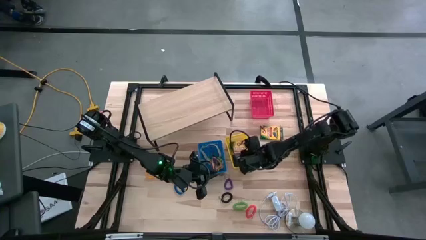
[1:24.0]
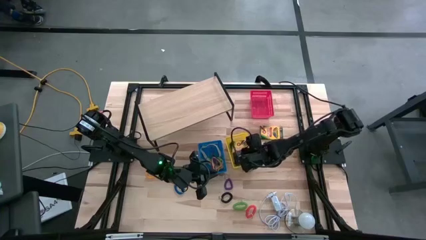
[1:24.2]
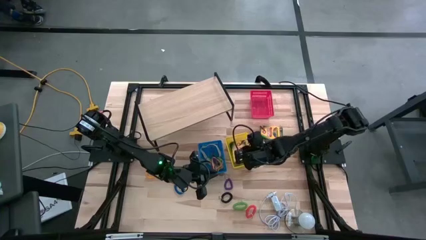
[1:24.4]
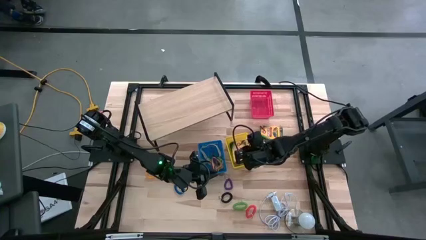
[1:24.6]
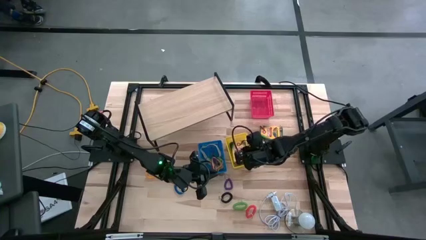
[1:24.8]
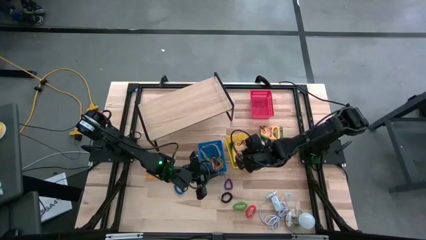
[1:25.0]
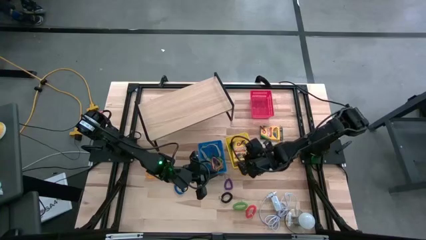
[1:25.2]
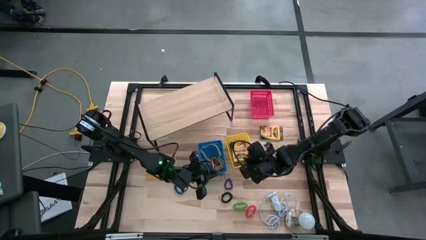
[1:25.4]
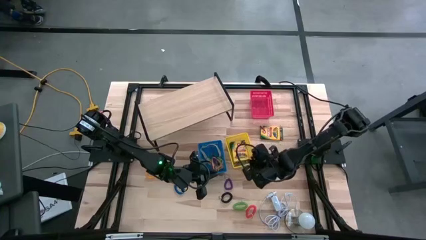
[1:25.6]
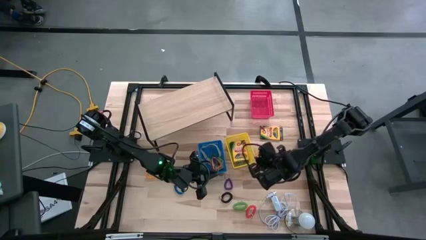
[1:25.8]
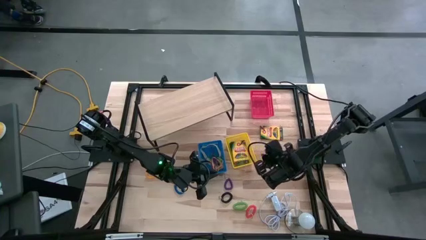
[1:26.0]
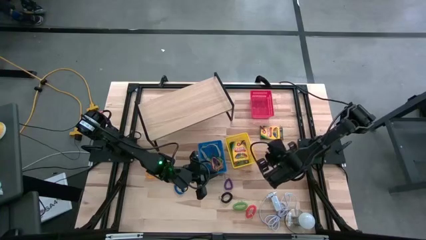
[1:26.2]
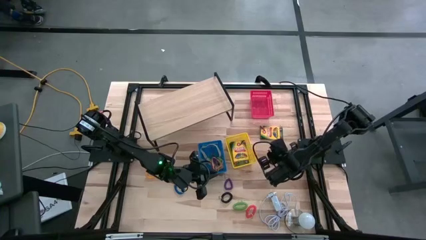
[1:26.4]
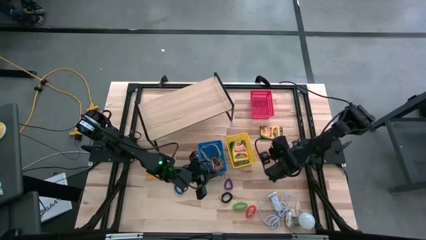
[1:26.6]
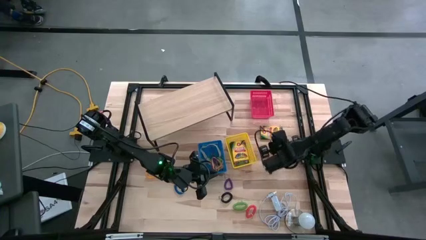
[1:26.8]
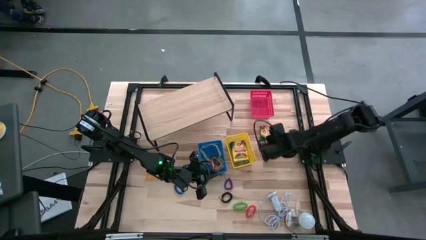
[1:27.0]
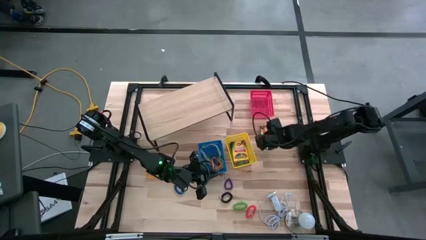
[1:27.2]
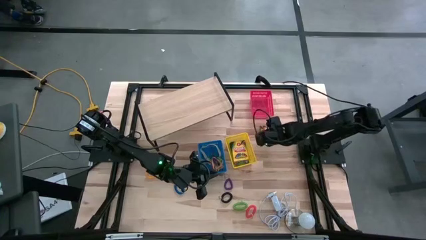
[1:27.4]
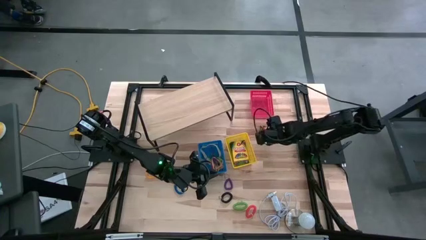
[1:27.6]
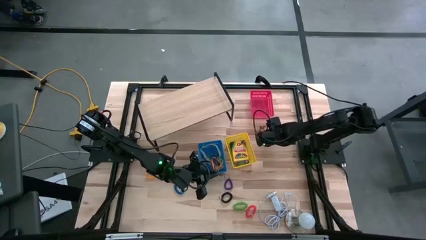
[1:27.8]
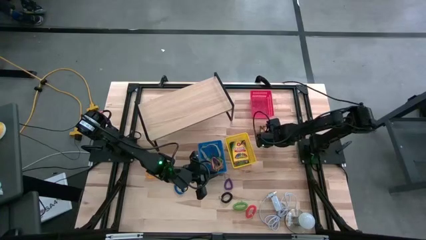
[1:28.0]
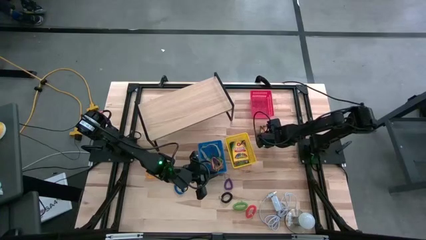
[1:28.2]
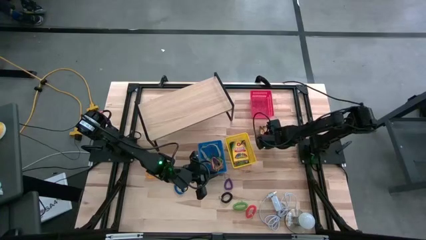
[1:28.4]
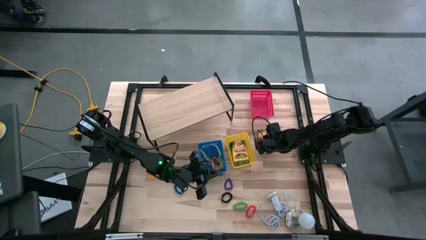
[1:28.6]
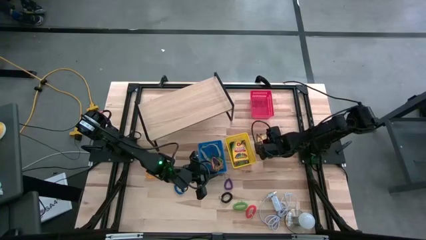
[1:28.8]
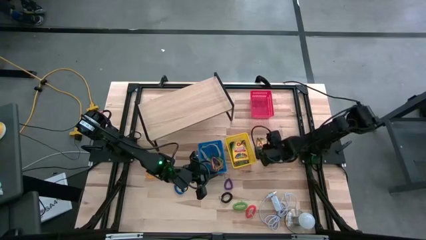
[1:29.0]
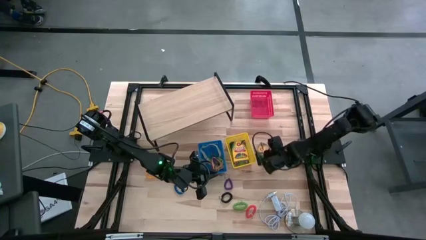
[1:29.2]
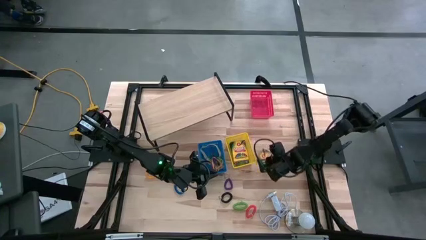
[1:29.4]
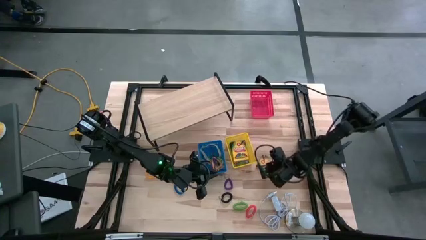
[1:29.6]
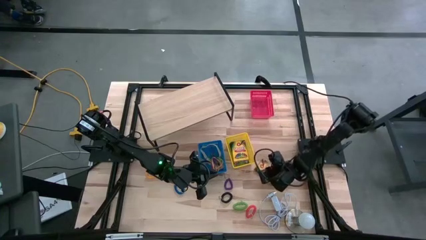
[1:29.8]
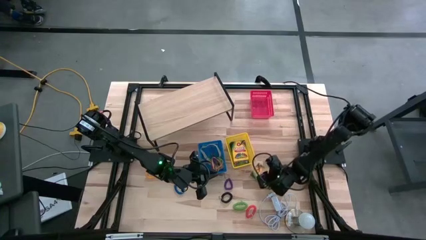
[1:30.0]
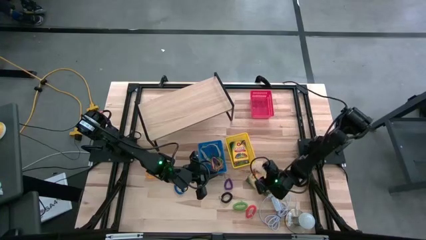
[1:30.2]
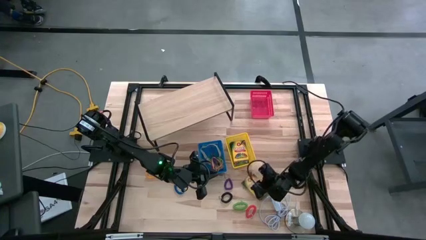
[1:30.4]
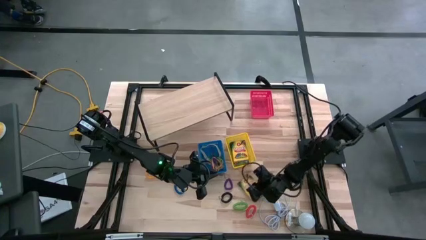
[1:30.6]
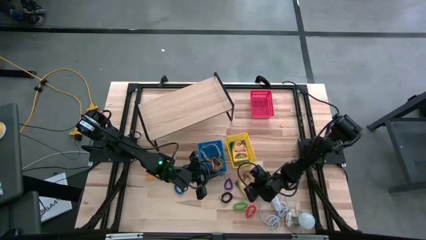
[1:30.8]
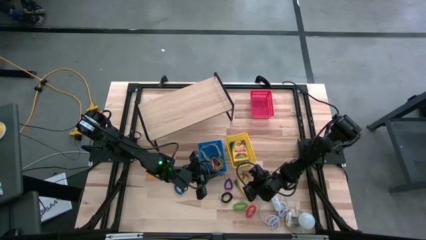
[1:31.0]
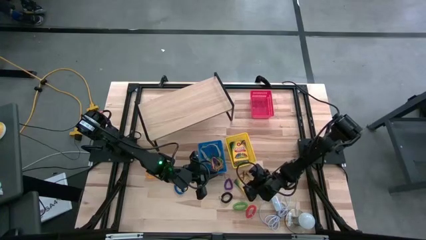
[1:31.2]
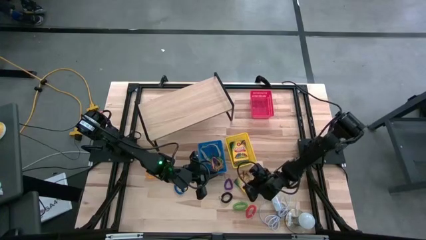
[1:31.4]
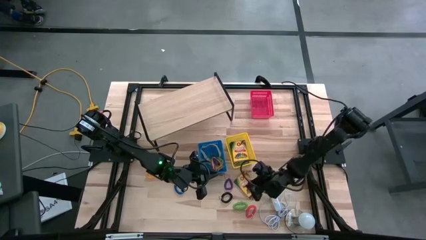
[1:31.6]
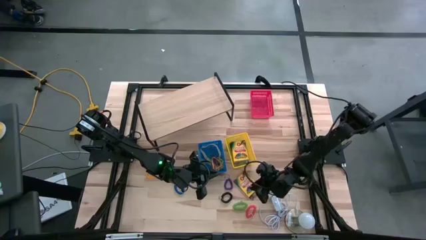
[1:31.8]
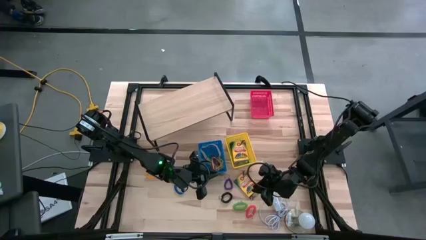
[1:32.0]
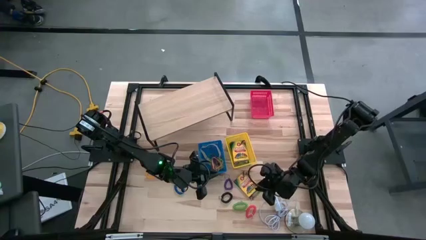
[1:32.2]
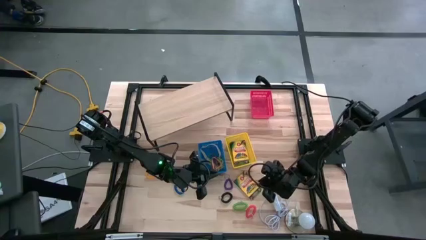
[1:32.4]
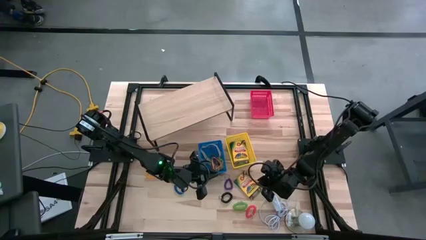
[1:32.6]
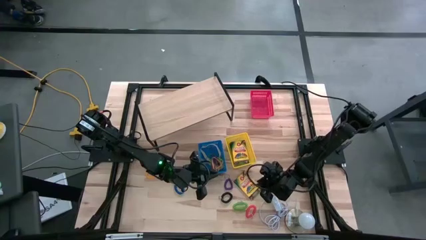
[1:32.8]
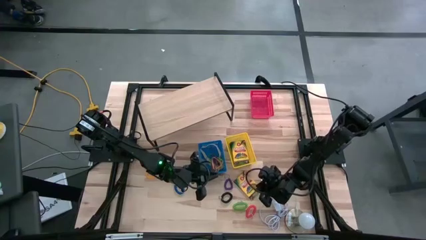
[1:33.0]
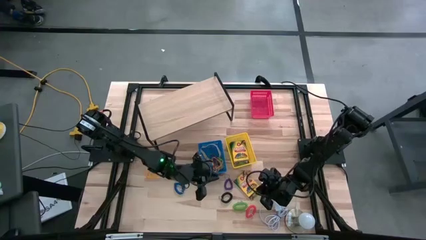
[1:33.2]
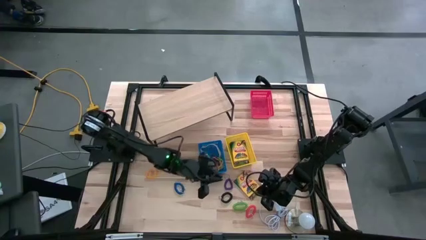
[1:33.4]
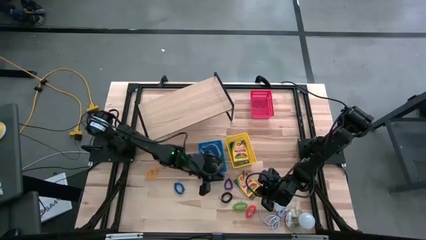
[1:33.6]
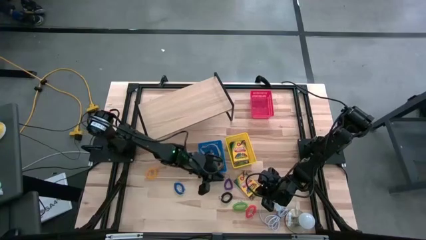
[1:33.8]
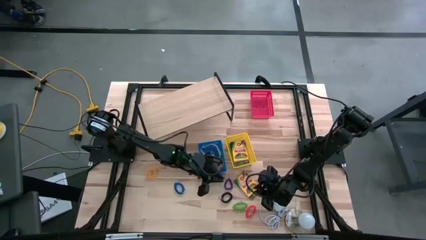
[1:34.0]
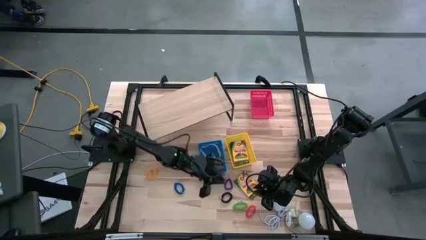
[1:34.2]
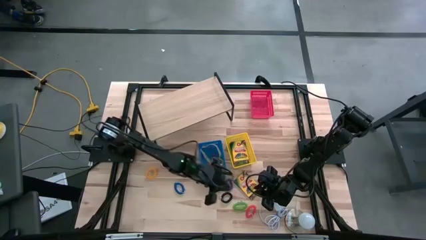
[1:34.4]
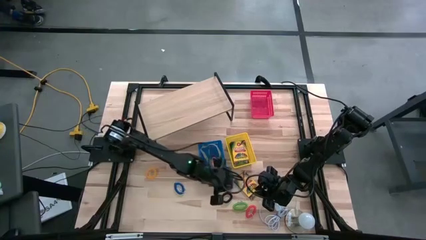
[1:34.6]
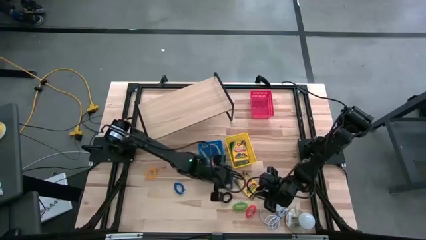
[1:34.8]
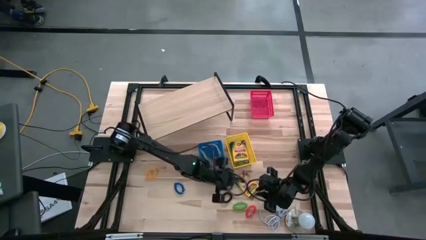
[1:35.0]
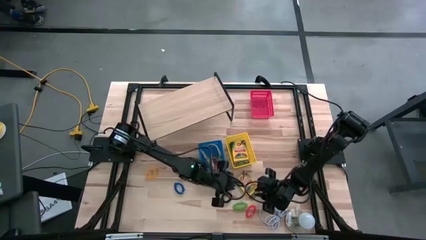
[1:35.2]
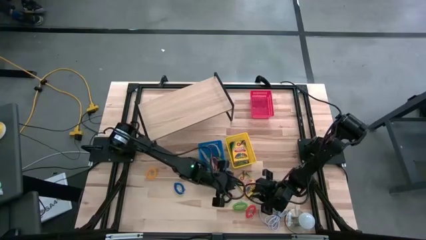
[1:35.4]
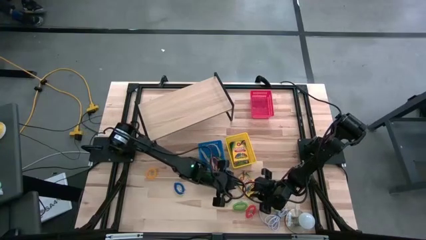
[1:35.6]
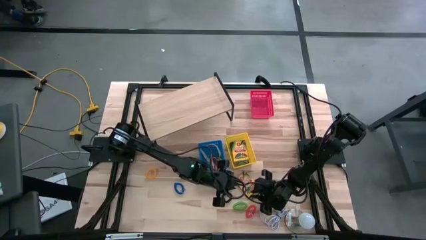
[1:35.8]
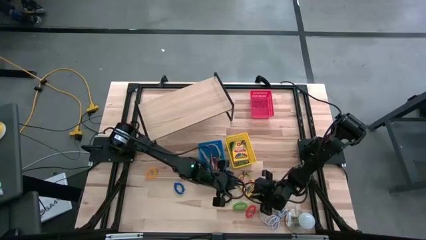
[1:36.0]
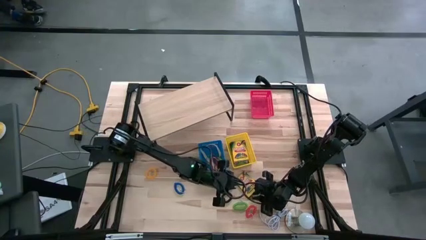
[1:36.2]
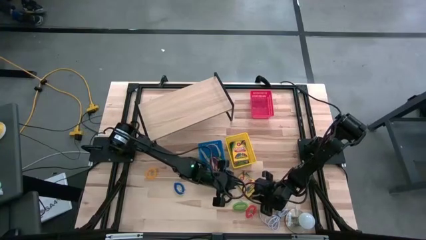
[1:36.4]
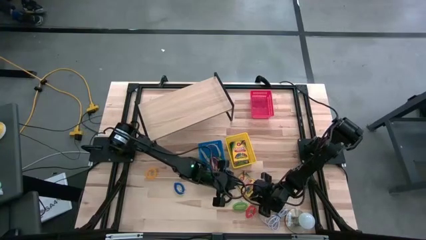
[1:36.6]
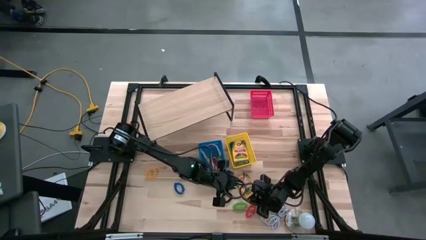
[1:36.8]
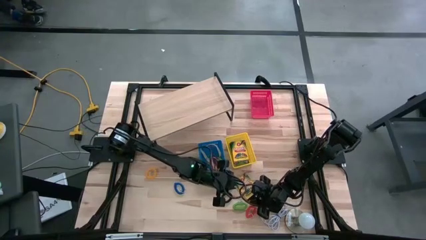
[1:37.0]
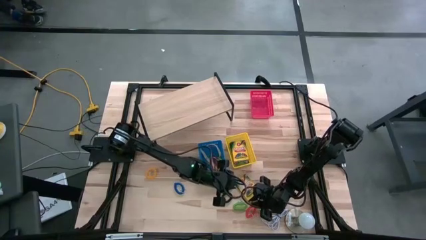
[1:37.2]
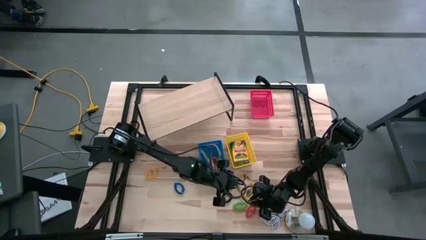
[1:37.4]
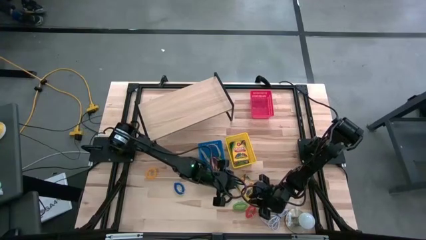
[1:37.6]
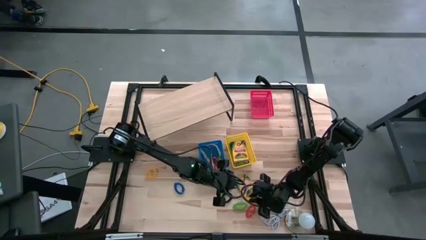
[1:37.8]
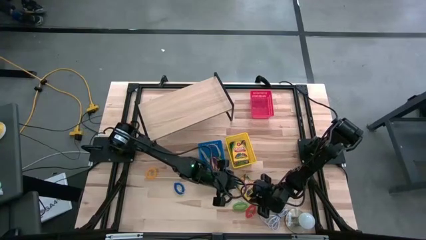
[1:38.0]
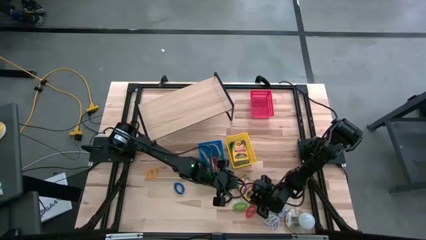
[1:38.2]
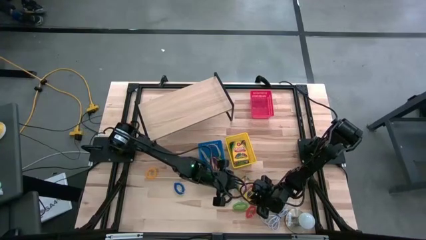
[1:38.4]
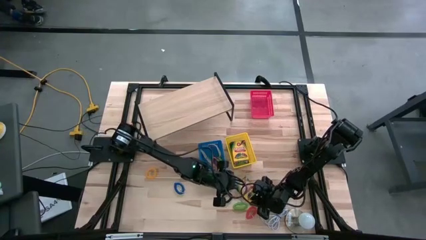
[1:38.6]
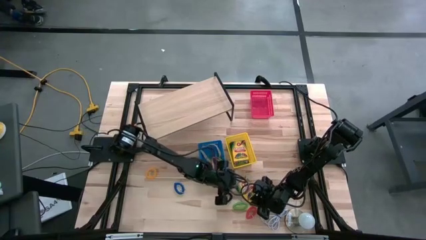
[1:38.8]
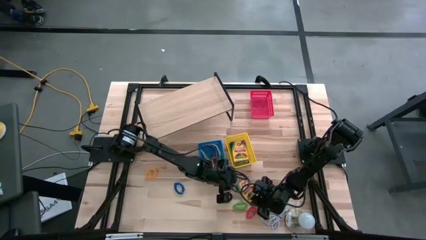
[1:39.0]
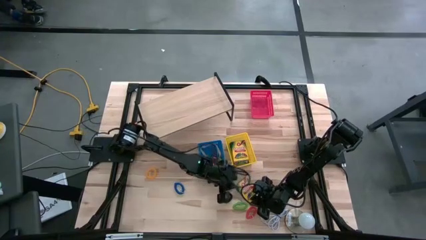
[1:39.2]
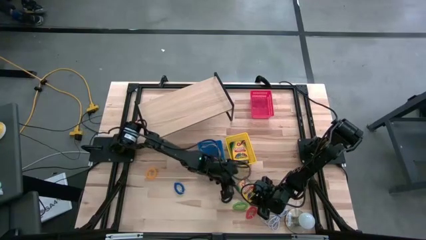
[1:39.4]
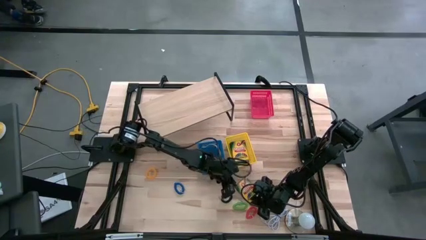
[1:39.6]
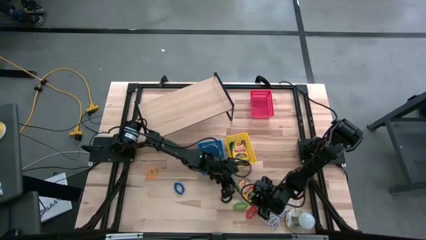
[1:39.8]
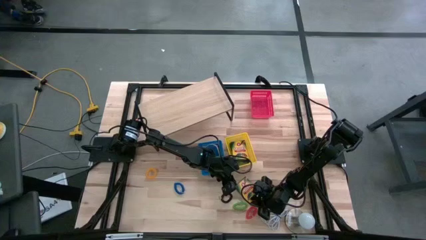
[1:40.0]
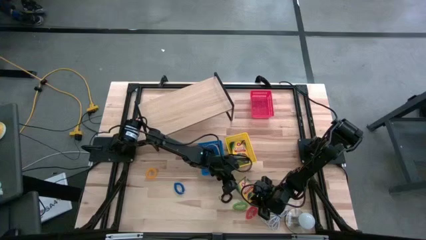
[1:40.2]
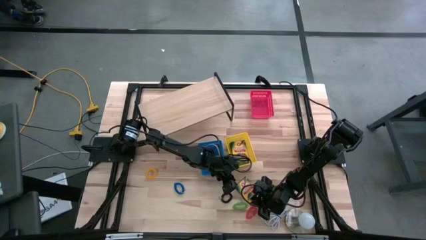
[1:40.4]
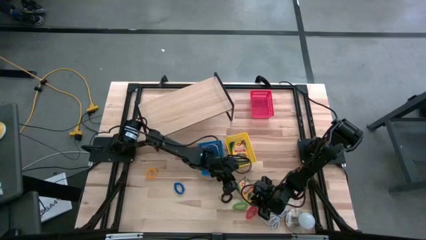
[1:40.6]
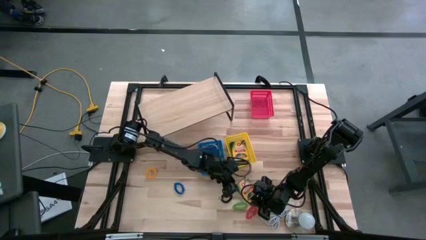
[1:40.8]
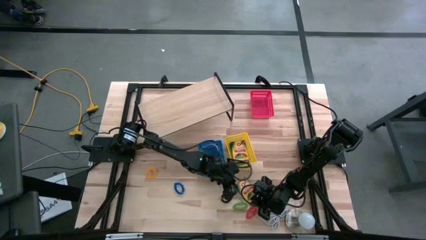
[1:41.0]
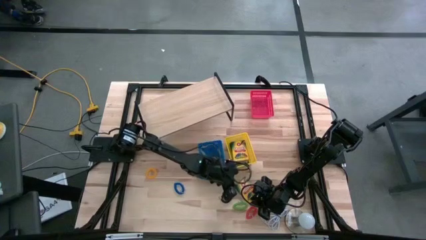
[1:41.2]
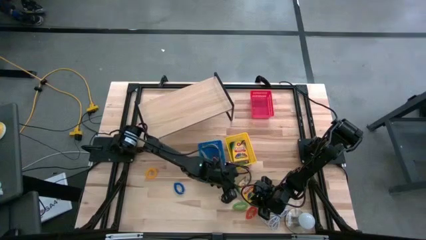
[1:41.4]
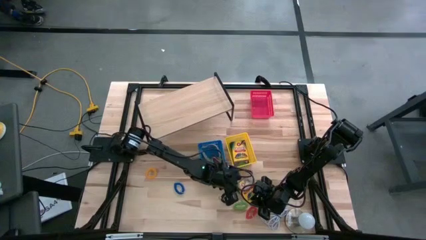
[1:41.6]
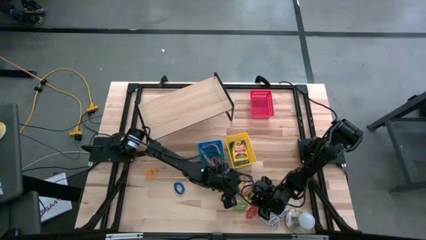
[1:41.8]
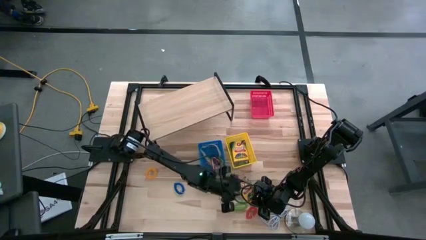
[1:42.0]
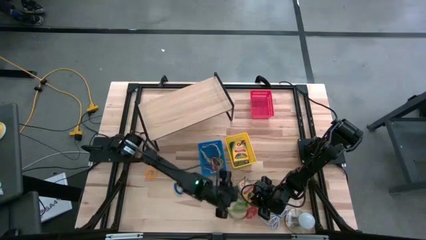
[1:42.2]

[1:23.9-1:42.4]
Task: Pick & Place Office Desk Supplies
Put the yellow crayon box into the yellow bin
